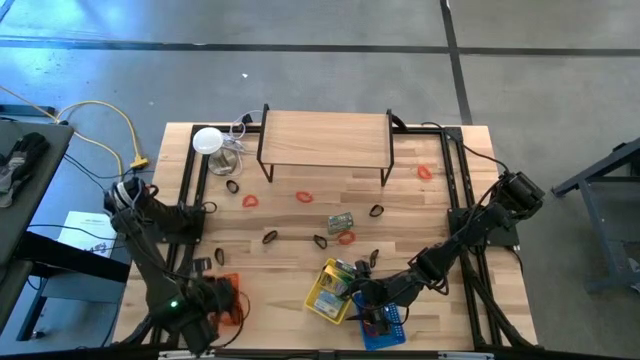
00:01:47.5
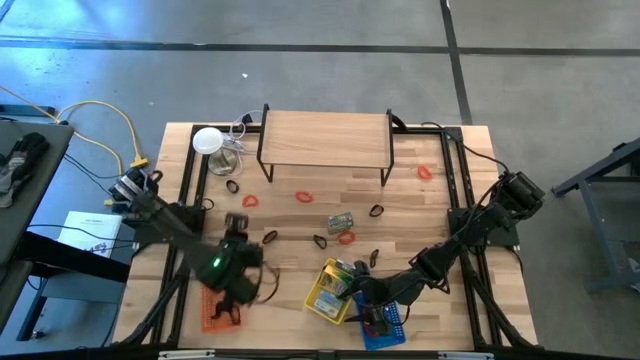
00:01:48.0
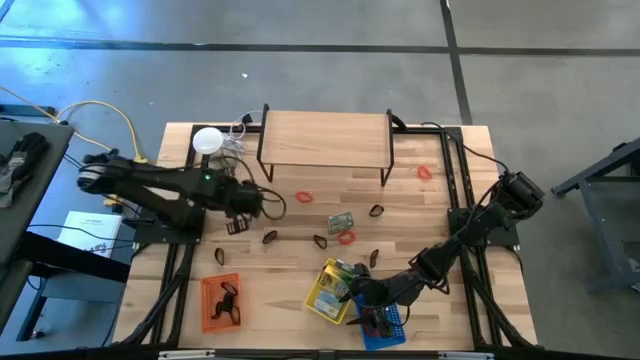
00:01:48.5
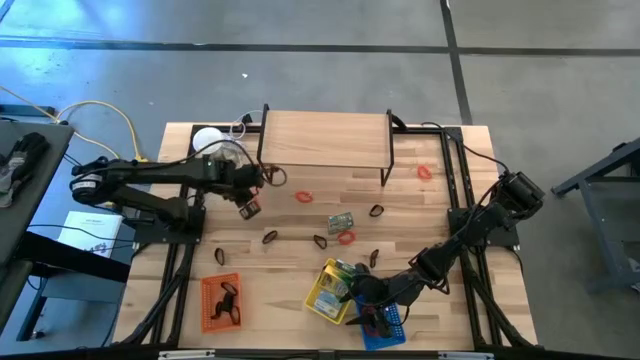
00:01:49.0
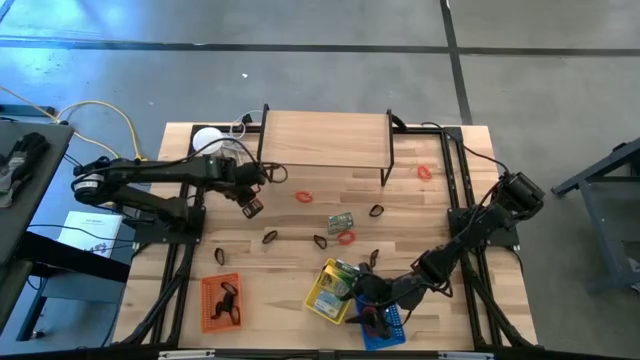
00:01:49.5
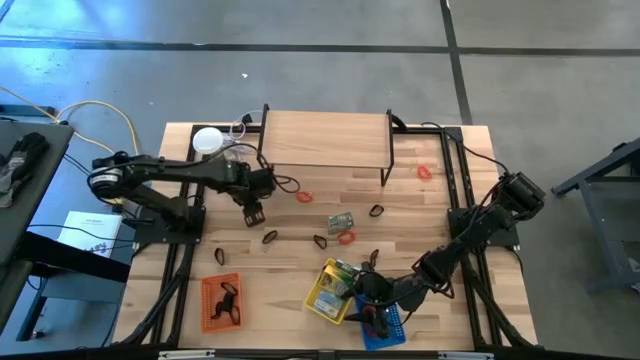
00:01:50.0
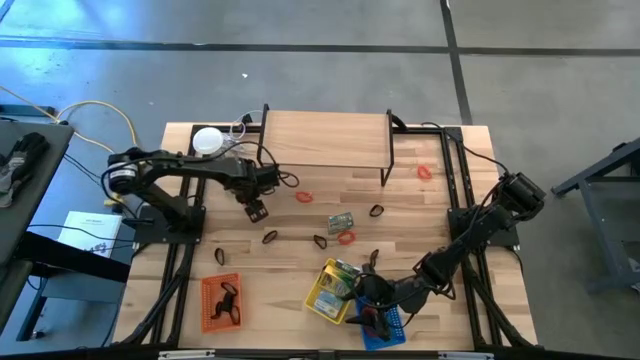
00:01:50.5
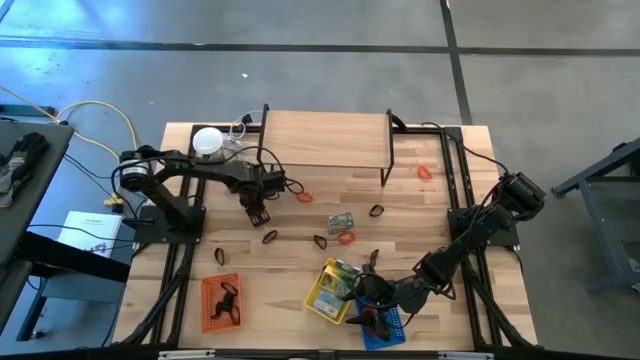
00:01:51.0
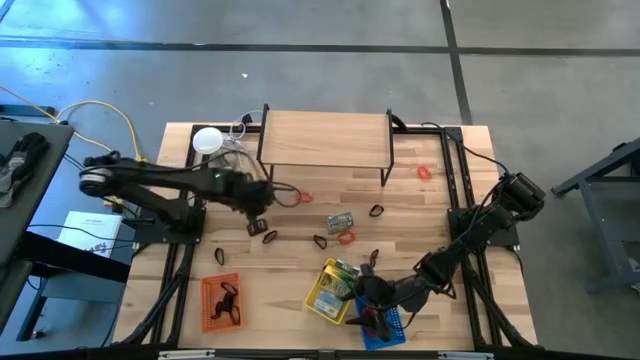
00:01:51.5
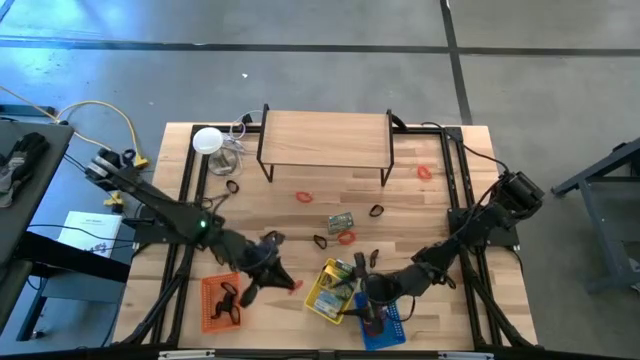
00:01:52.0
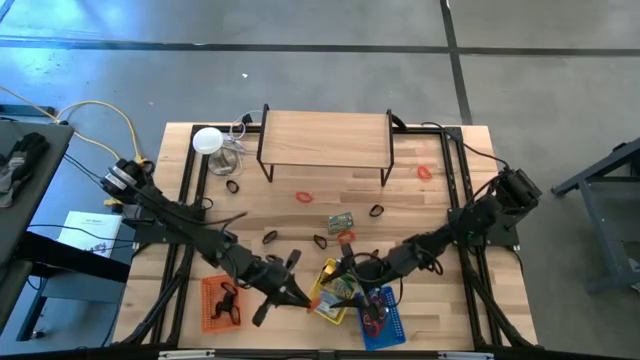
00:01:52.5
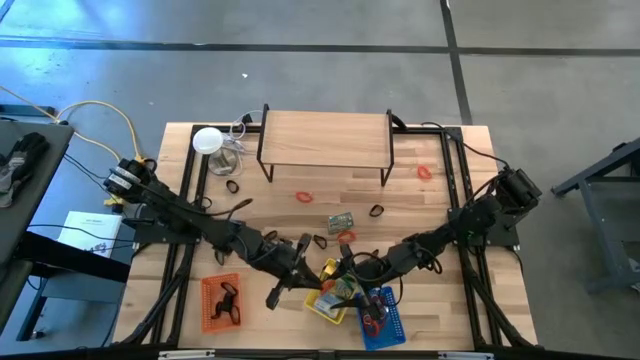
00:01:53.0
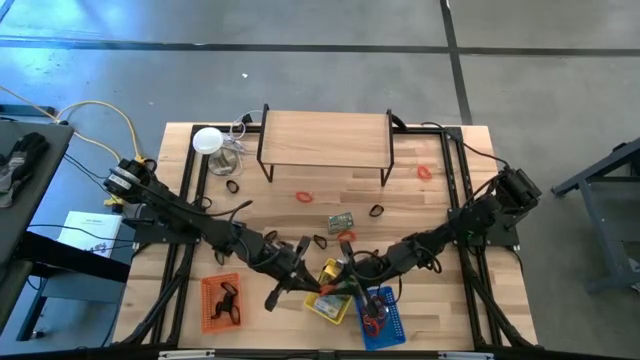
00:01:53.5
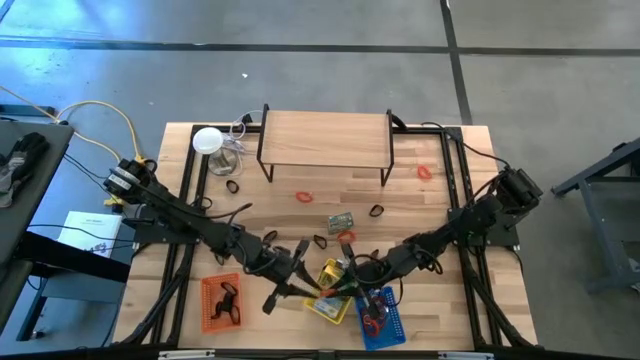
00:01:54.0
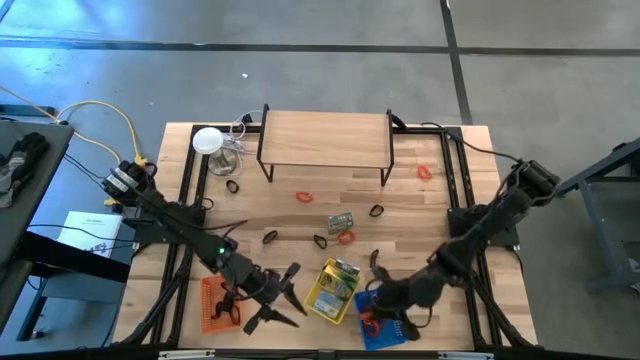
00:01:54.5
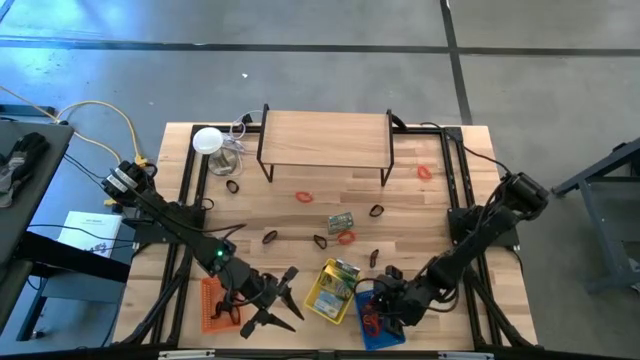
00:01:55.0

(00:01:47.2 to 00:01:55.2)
Task: Pick & Place Office Desk Supplies
Put the orange spring keychain into the blue bin

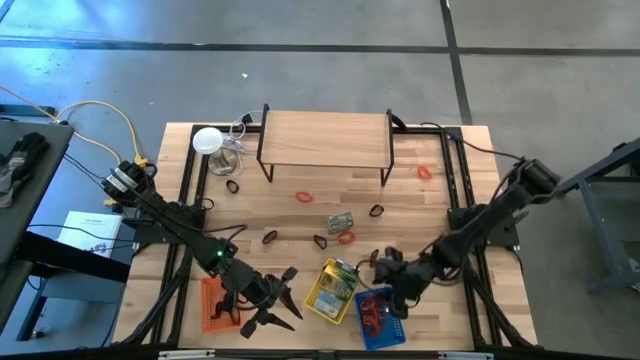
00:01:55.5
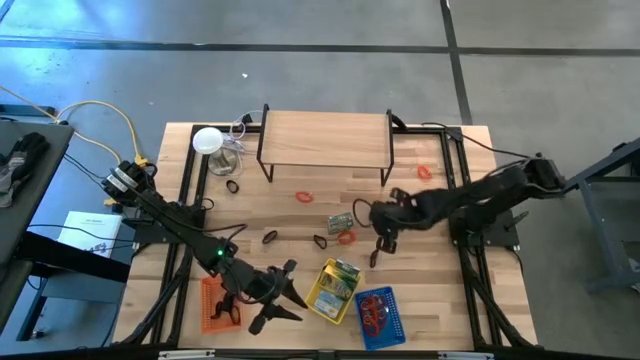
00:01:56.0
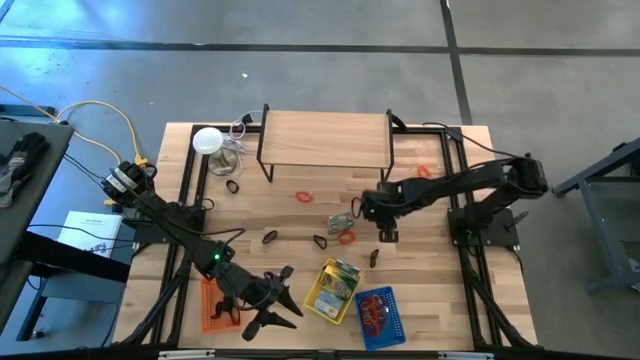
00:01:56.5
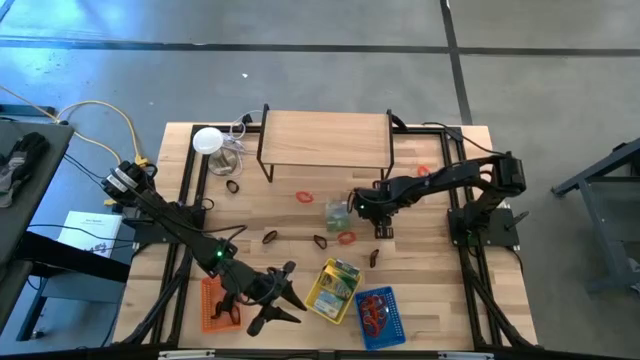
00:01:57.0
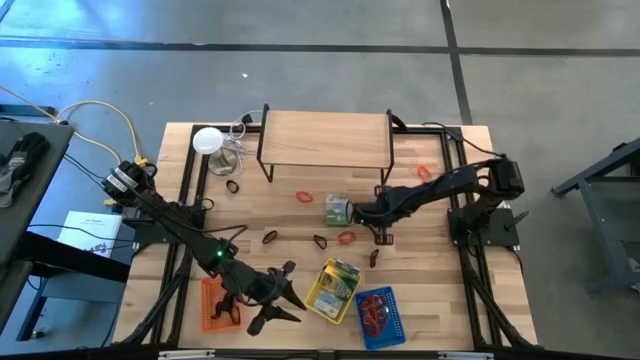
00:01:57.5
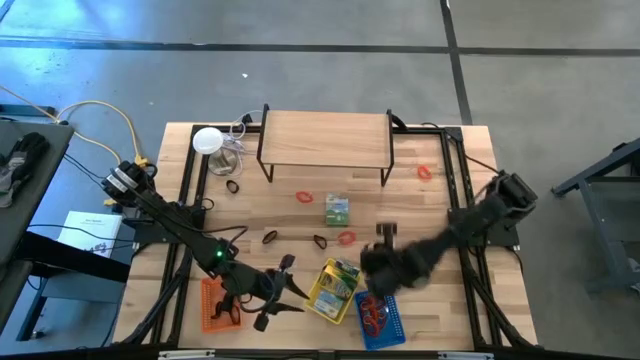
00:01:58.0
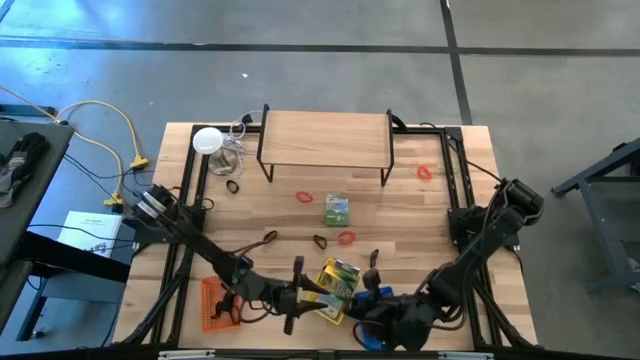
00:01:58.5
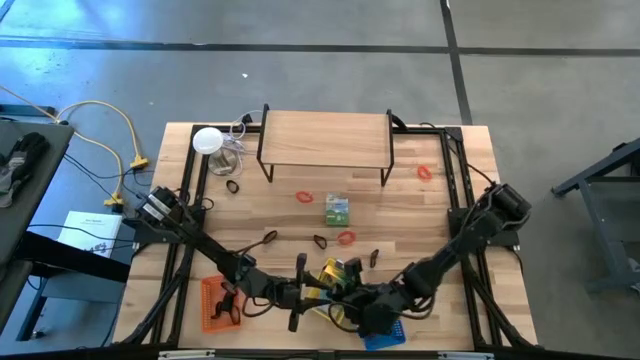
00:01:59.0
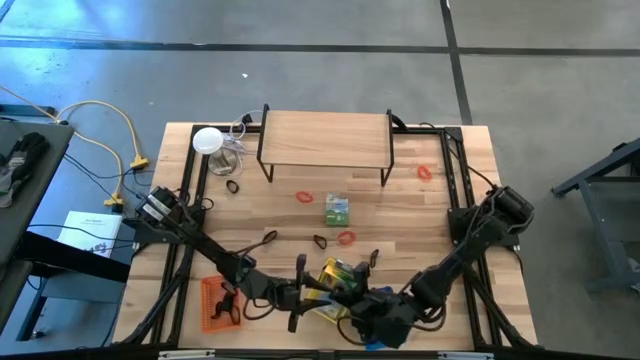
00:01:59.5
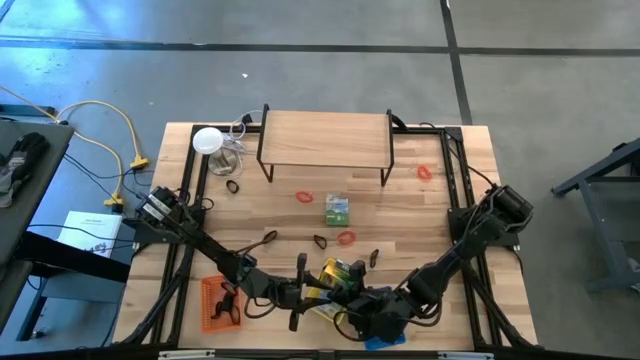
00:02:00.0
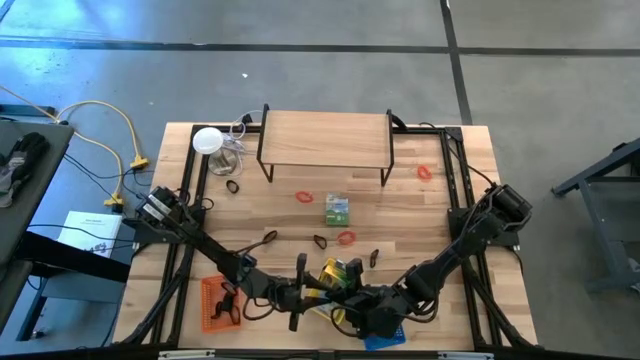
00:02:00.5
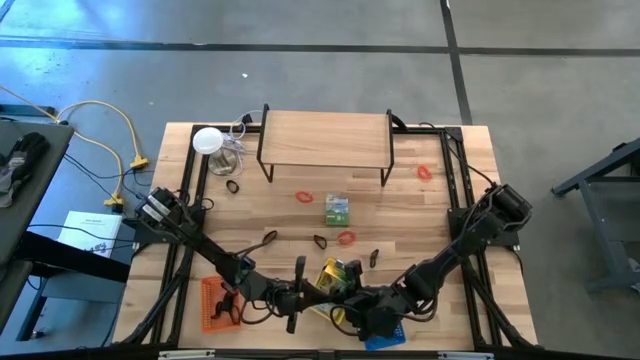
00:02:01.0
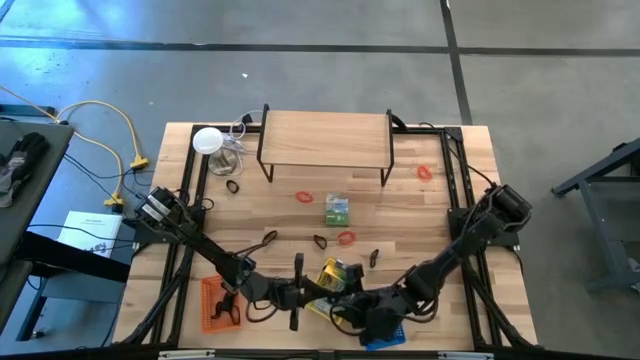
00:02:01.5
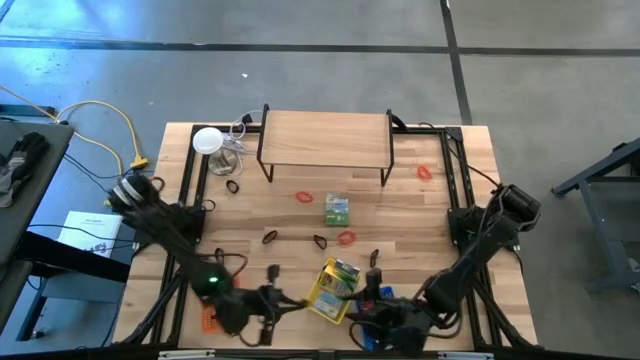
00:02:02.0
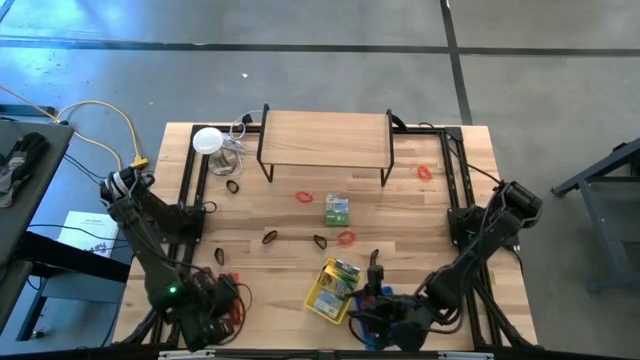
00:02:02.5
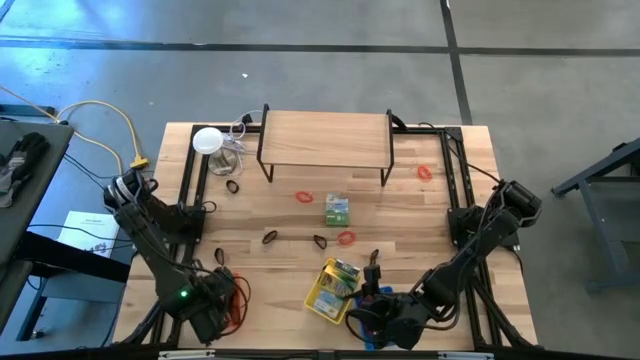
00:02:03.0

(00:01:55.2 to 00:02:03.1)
Put the black rubber band into the orange bin

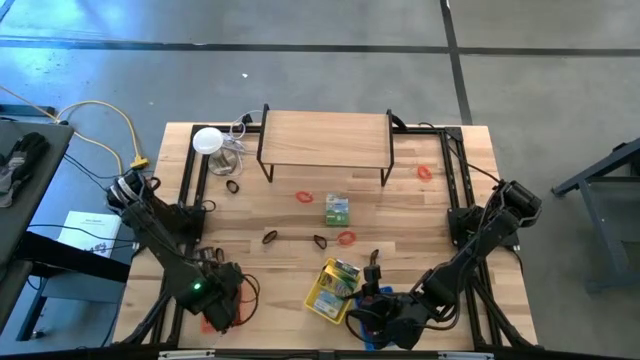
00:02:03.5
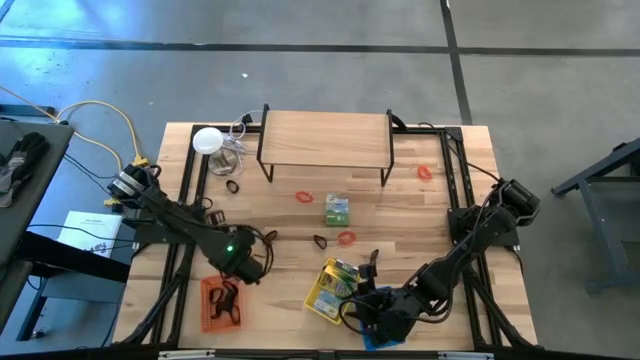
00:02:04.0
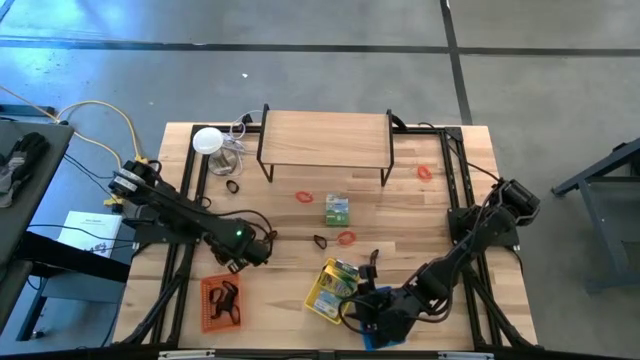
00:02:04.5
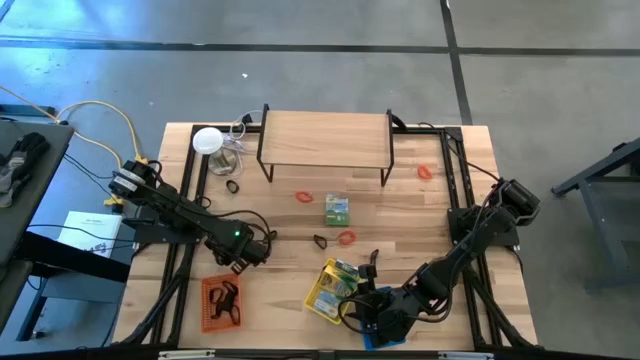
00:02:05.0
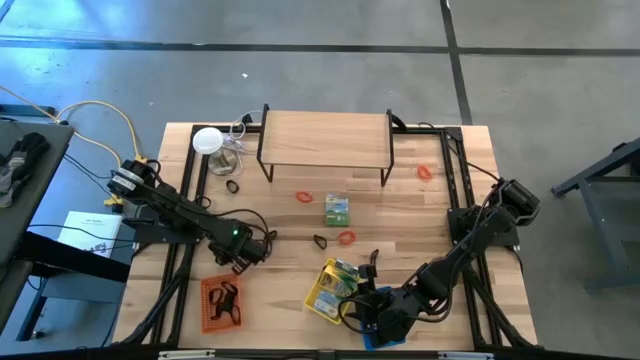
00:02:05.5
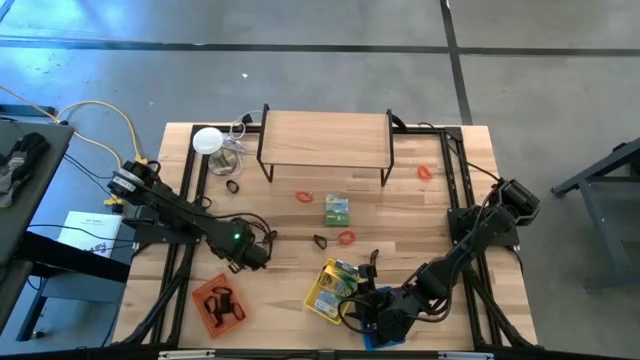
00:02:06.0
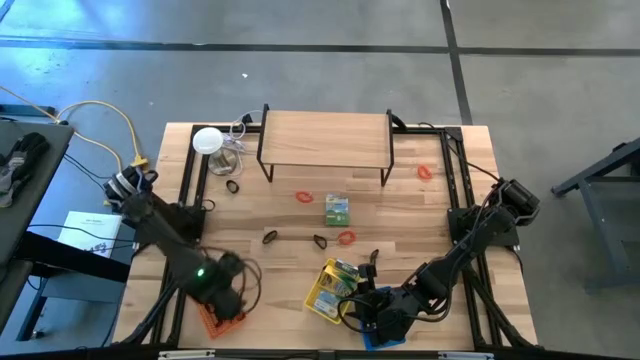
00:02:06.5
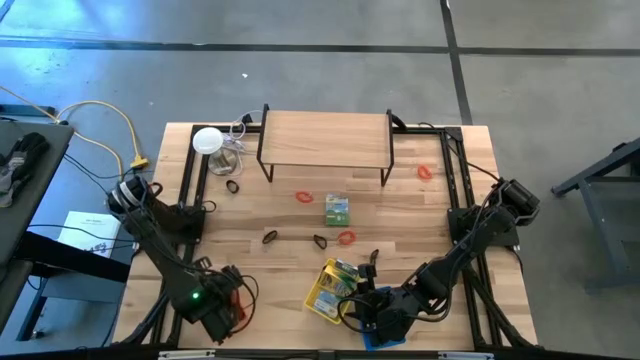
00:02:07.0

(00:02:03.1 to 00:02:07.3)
Put the black rubber band into the orange bin

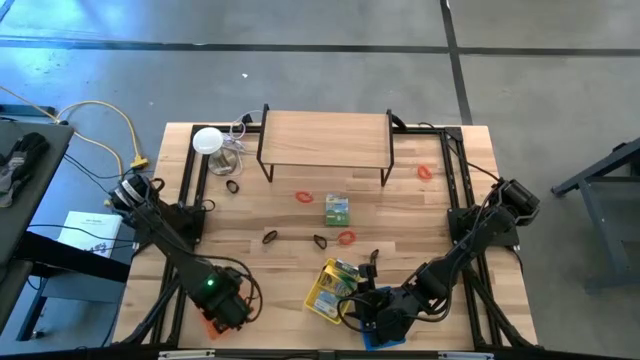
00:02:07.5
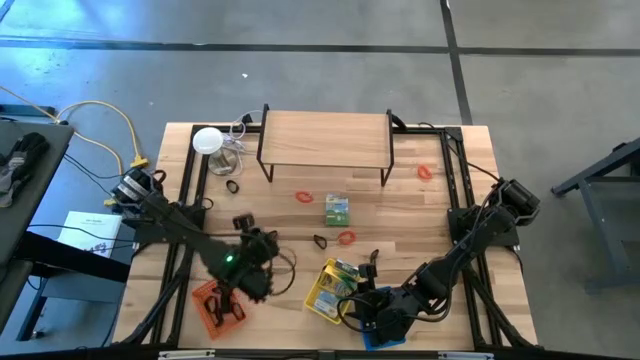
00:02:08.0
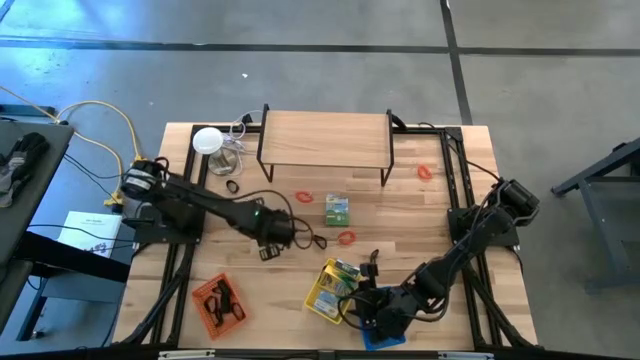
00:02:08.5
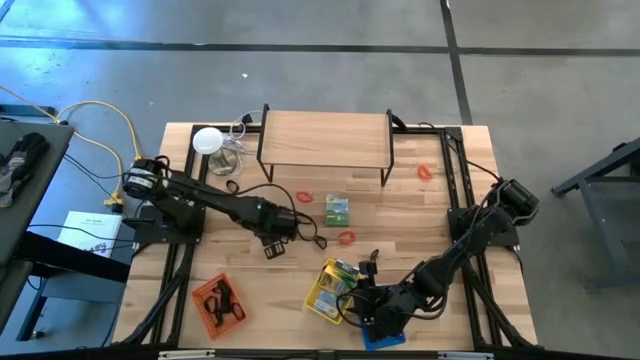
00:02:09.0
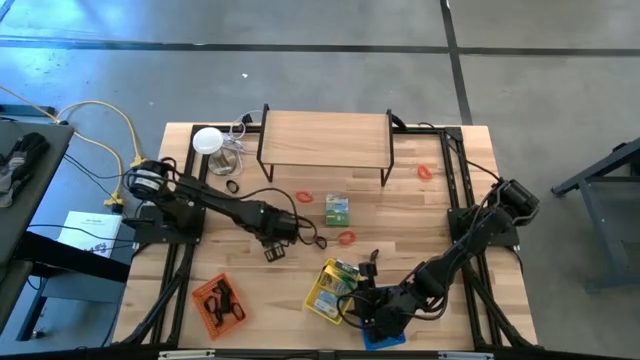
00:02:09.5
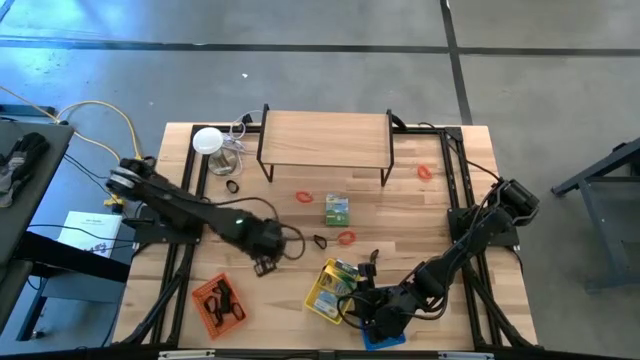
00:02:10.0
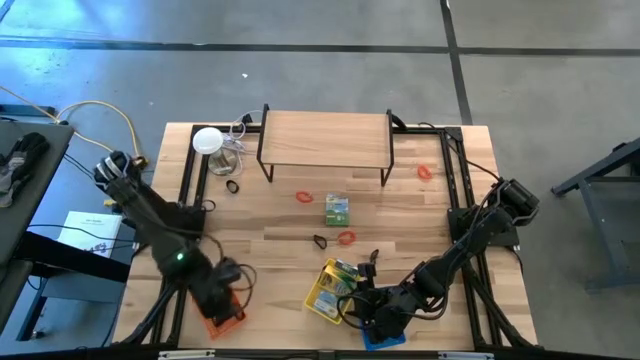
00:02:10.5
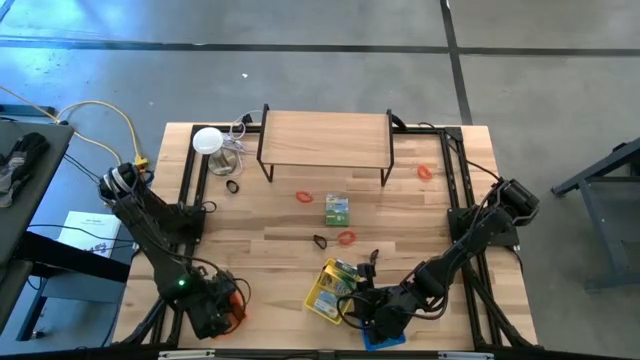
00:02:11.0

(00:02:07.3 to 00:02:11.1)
Put the black rubber band into the orange bin
